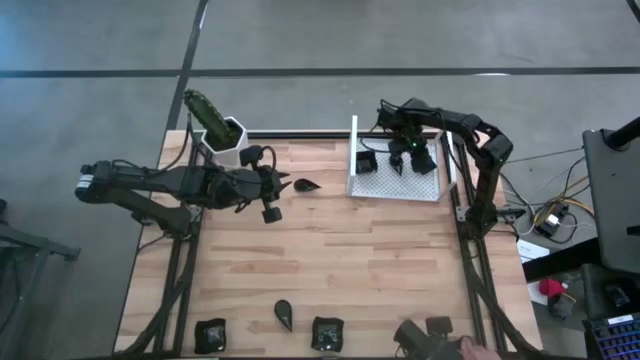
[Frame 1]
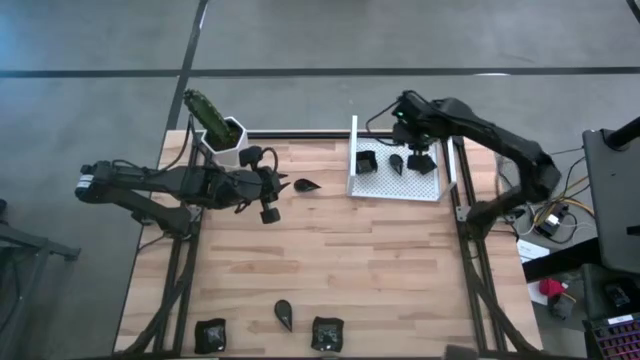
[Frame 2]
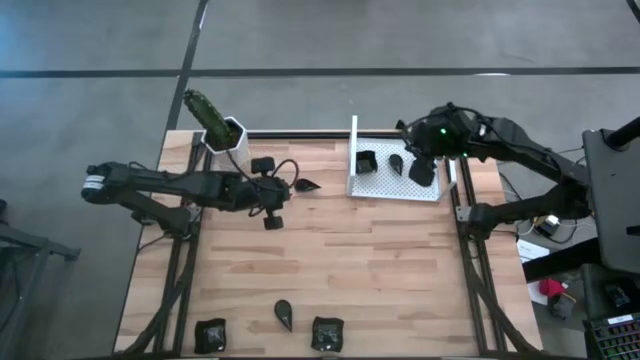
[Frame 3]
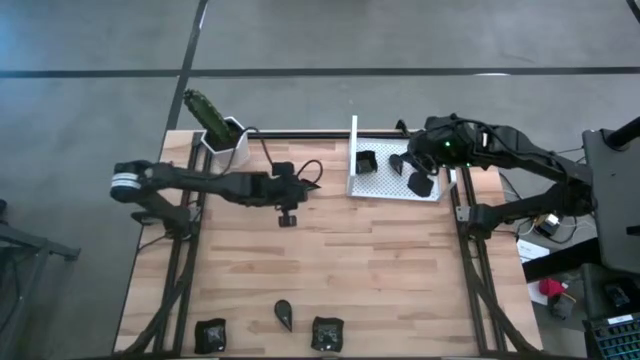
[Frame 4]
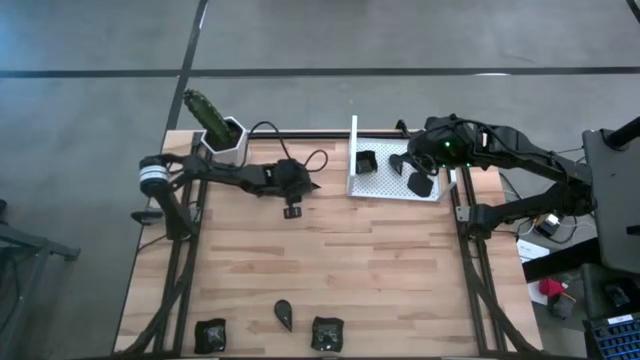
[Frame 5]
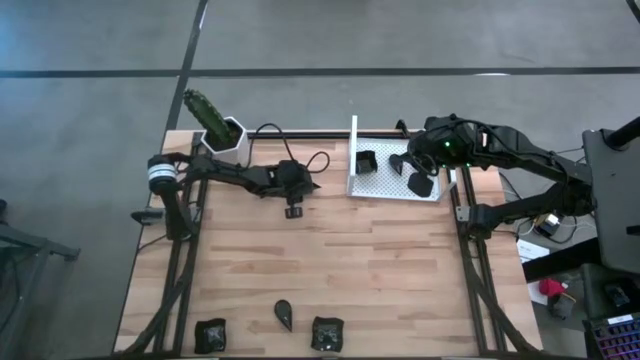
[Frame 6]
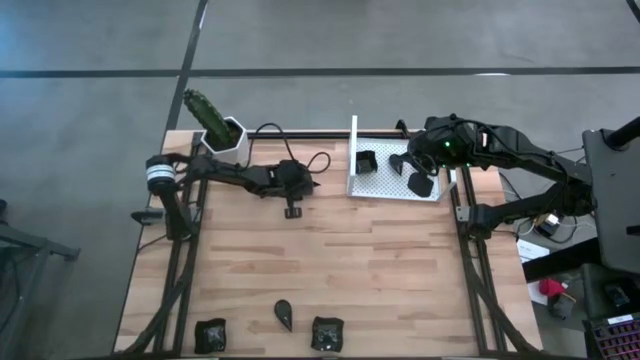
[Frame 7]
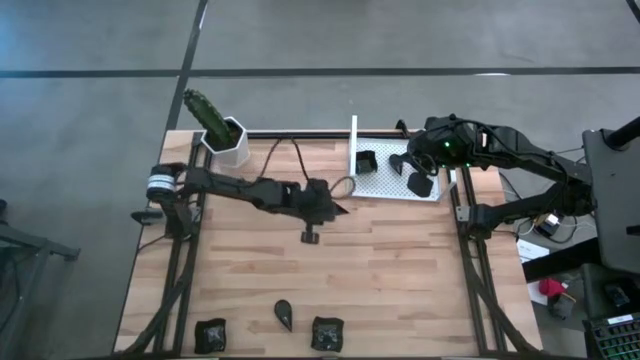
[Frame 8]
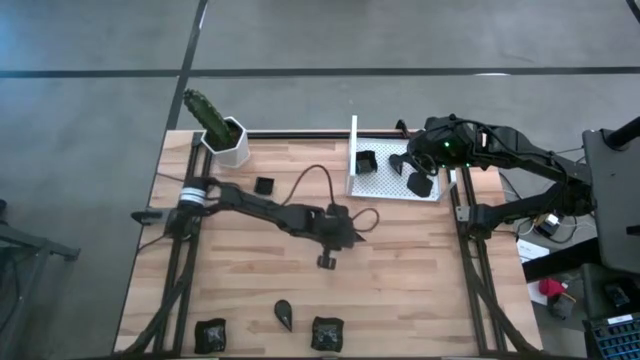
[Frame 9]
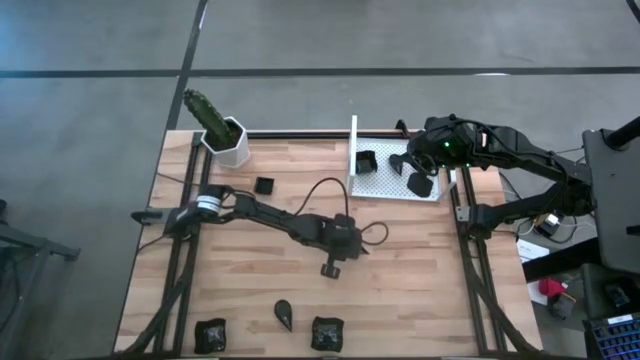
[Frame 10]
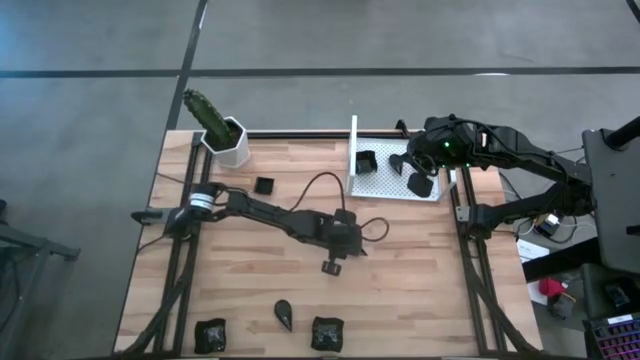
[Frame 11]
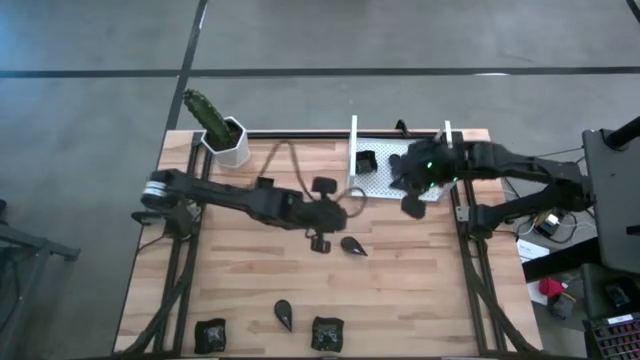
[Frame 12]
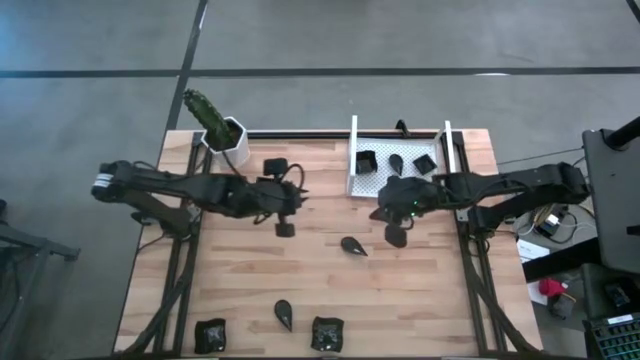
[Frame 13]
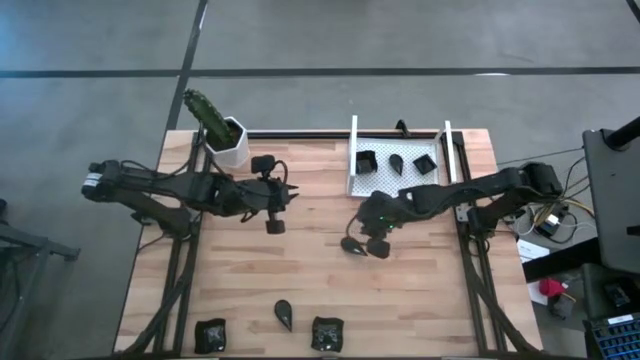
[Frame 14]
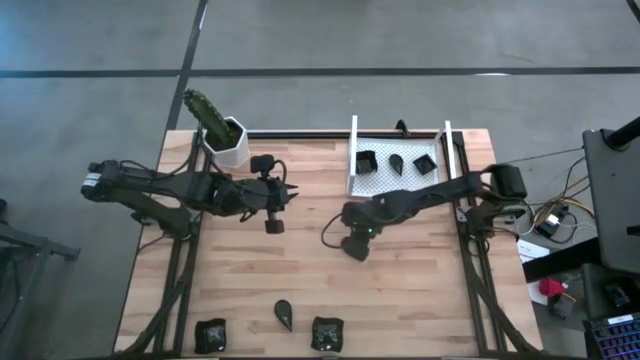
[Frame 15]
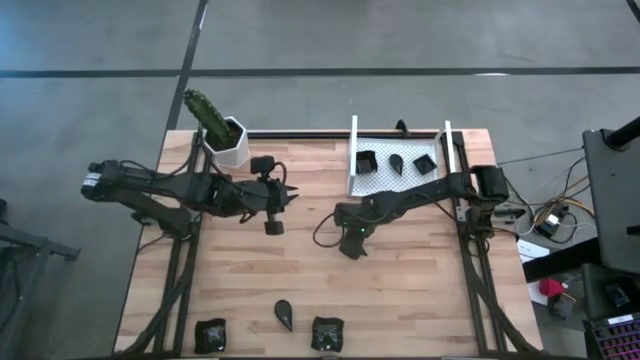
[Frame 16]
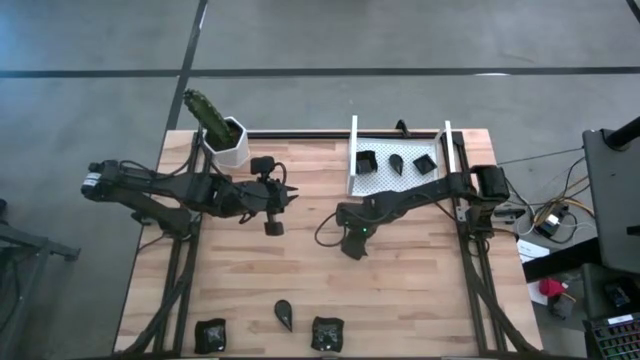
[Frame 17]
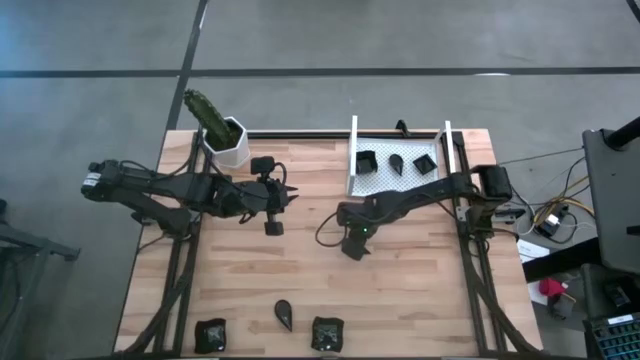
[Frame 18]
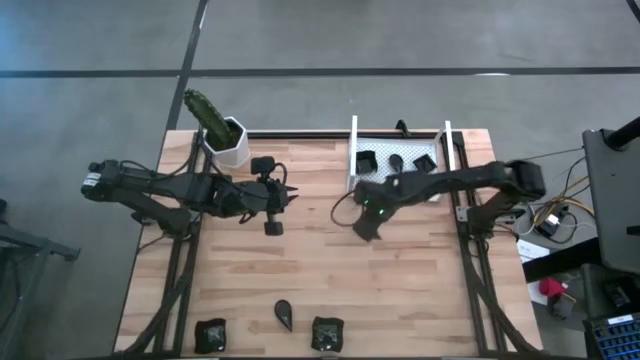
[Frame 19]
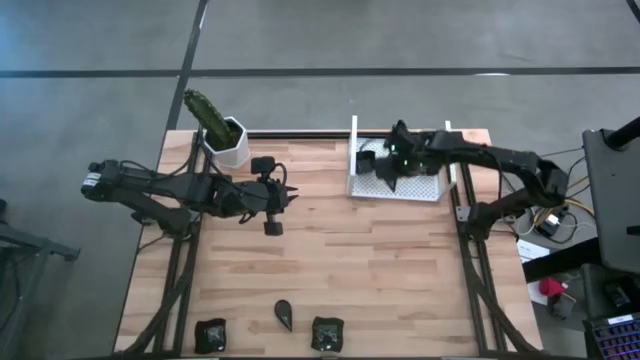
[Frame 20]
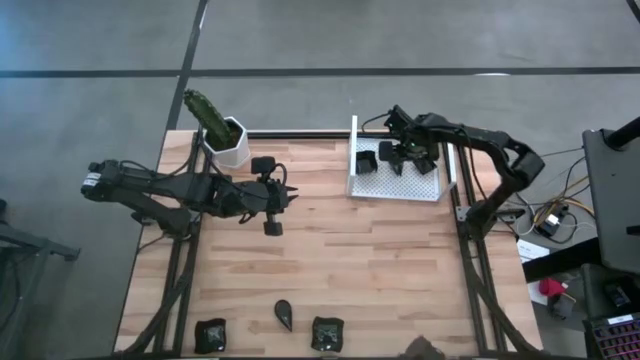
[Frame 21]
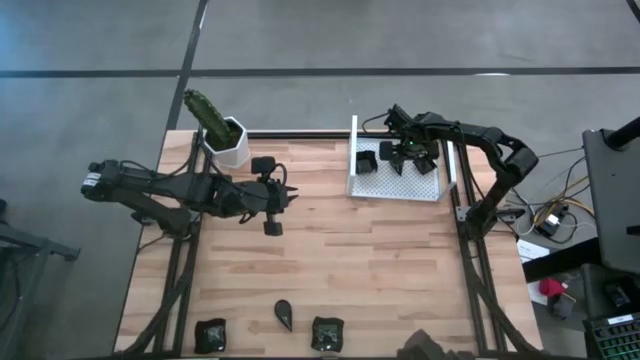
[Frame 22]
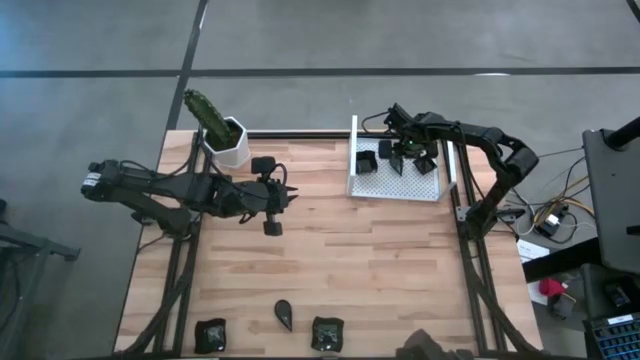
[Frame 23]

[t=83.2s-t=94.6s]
Task: Pick & Place Mini shaped plates
Stack the black drop shaped plate on top of the other black drop shaped plates on the shelf

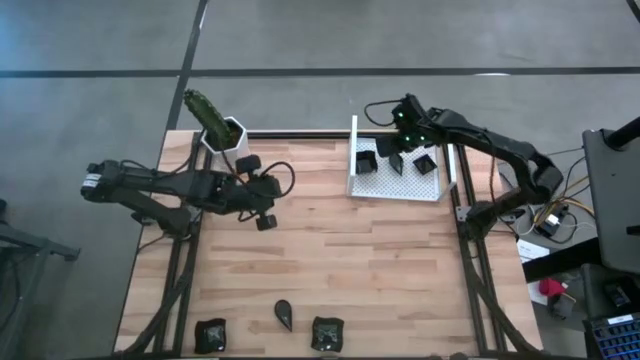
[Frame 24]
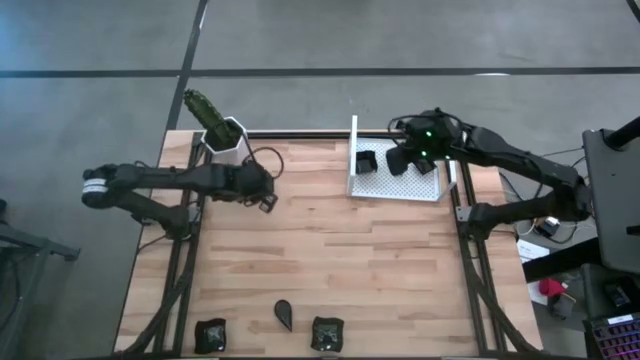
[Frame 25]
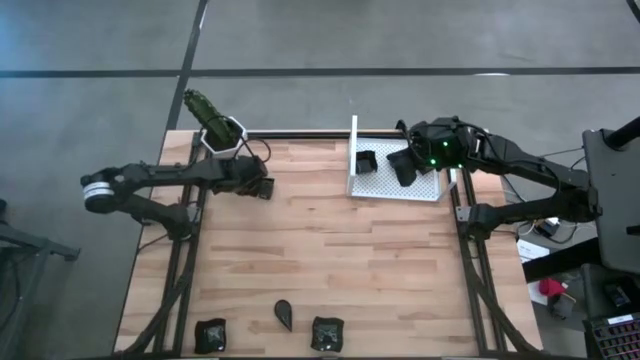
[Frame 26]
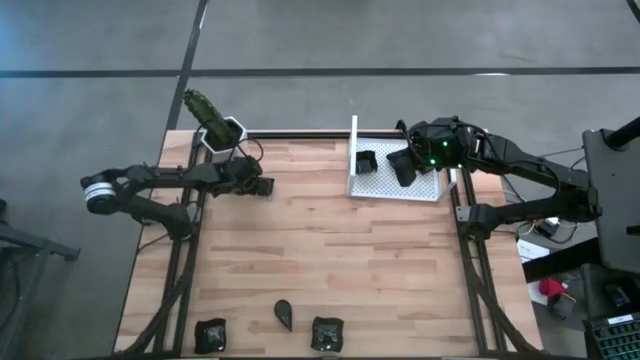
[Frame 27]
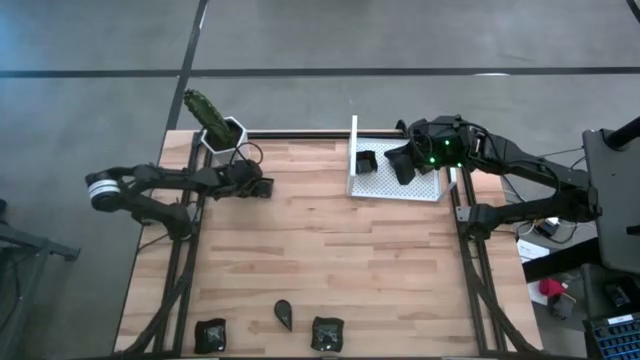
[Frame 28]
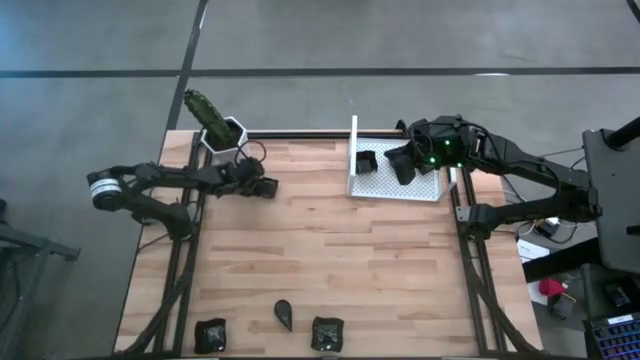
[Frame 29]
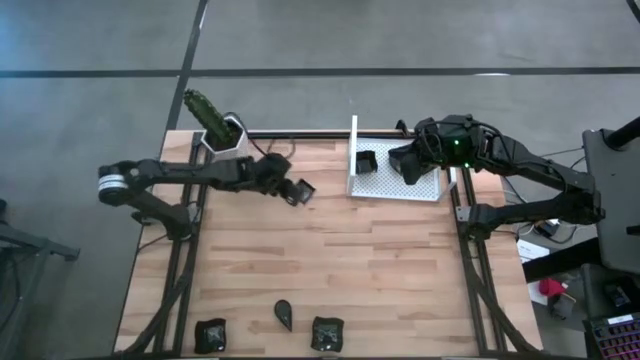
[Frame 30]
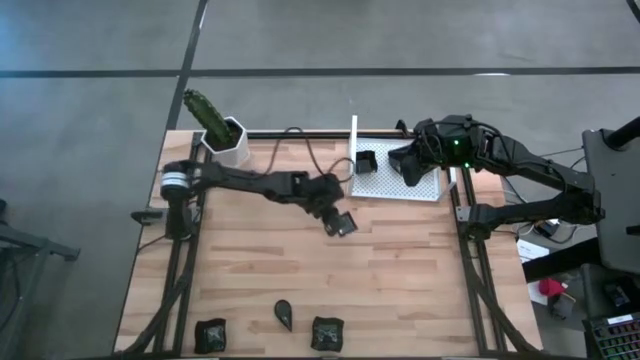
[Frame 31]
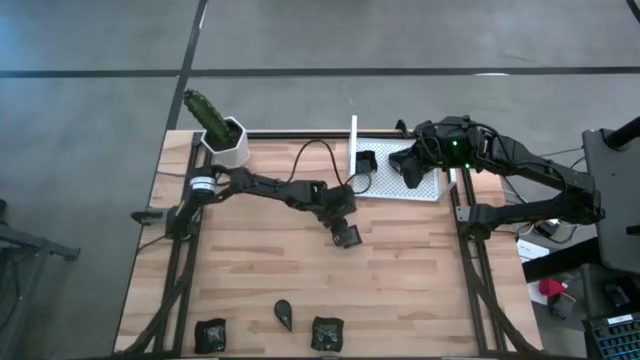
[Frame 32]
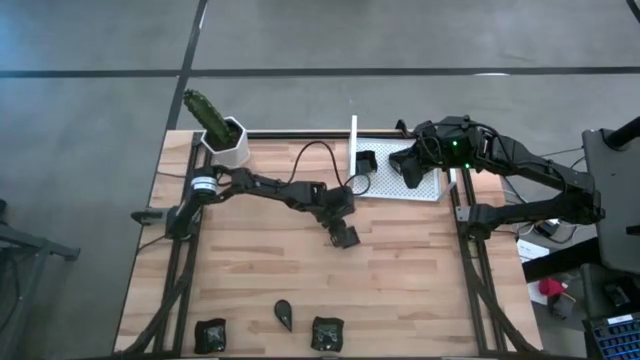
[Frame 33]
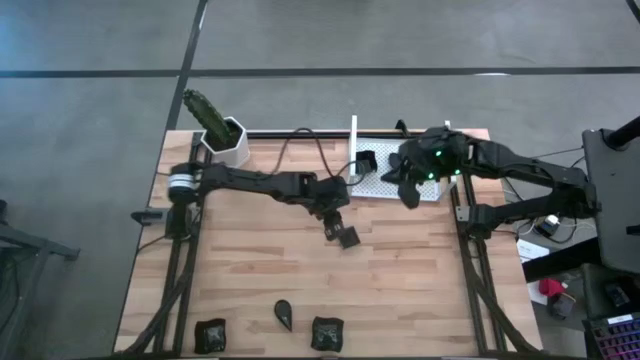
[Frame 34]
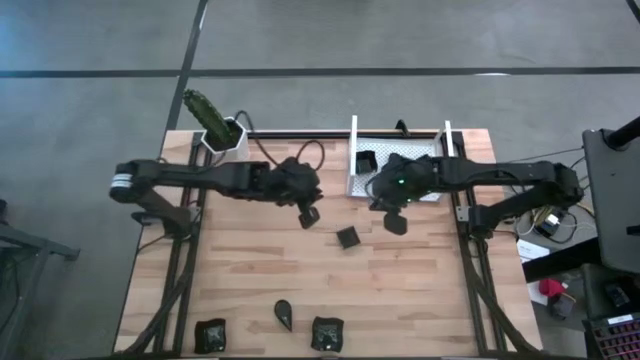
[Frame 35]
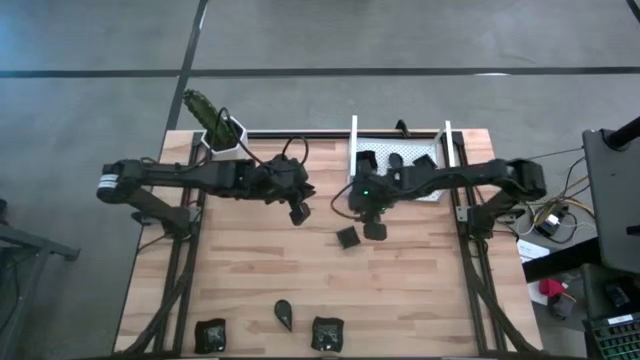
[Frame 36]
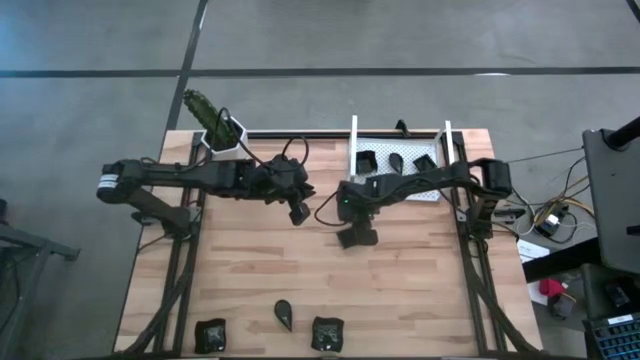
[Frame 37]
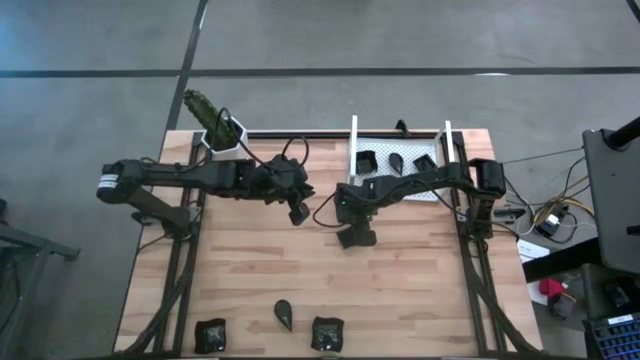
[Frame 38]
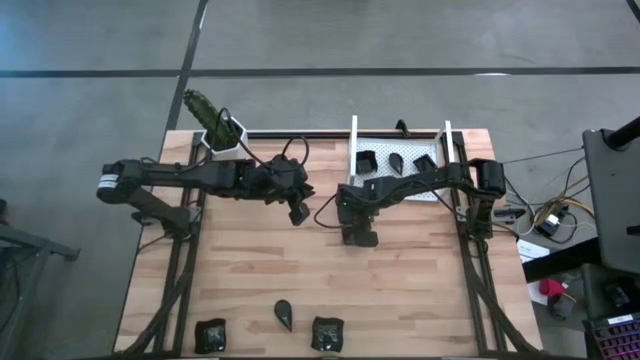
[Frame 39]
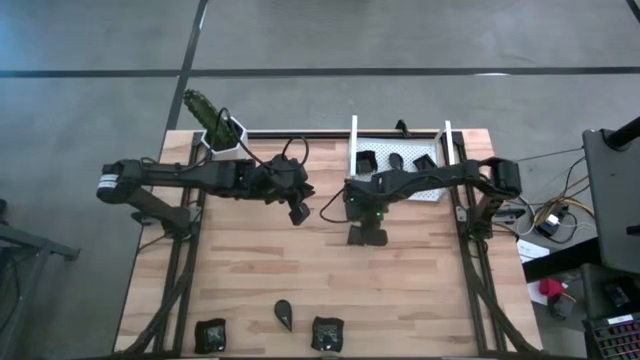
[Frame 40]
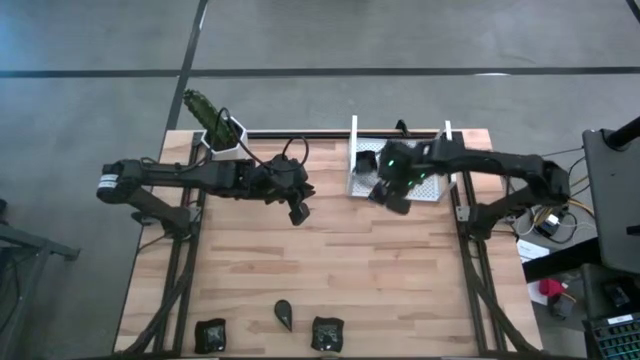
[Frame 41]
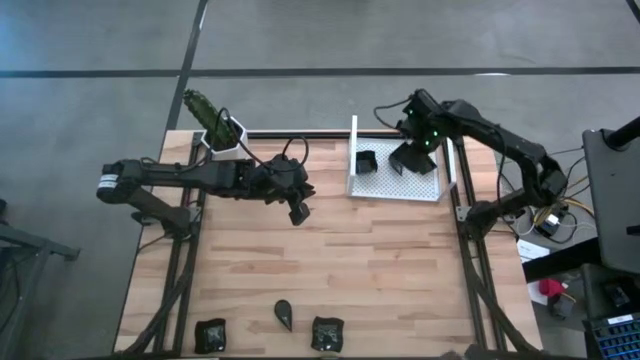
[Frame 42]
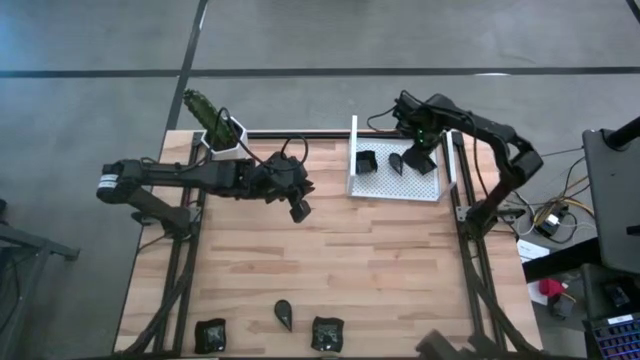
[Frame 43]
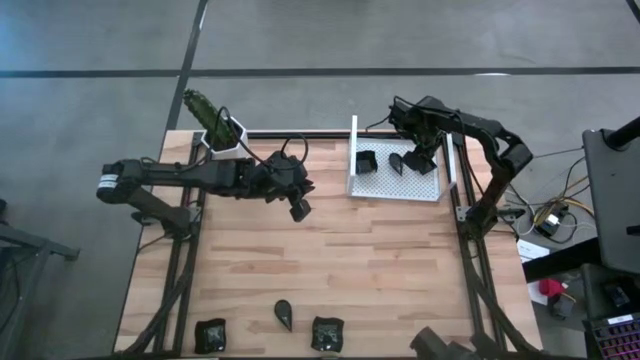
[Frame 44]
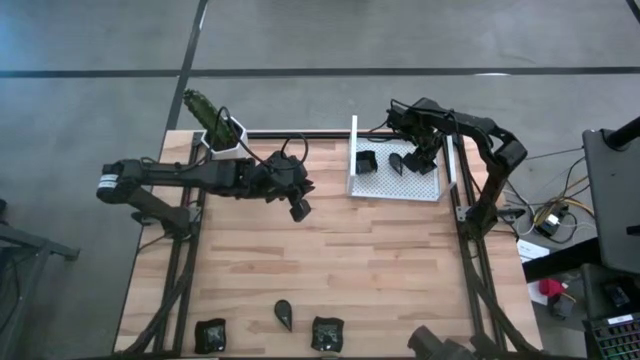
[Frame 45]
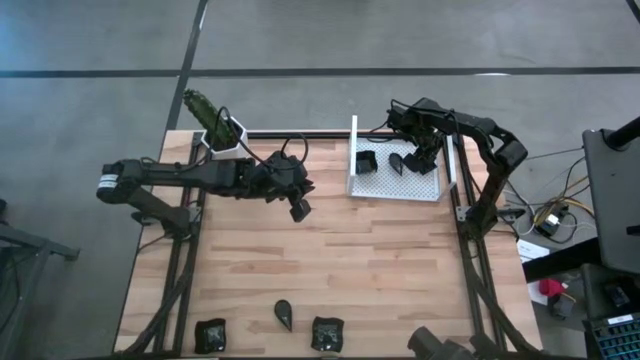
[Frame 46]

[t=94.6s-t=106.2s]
Stack the black square plate on top of the other black square plates on the shelf
